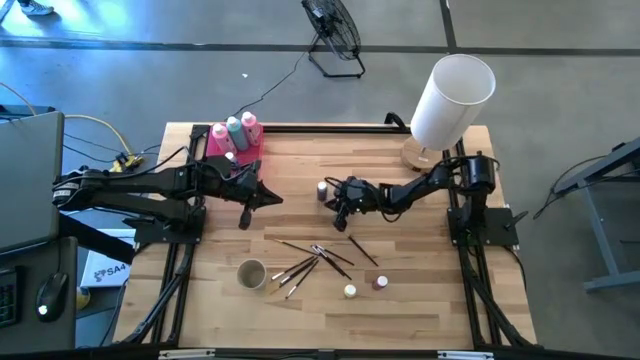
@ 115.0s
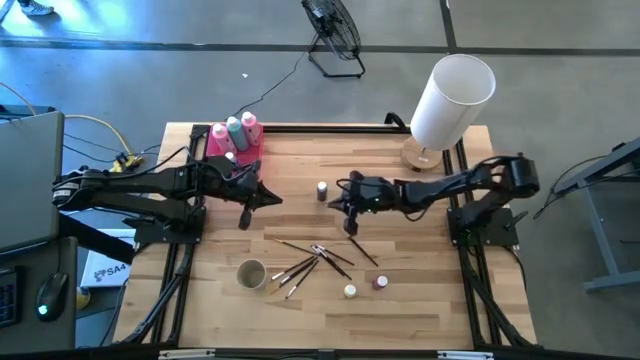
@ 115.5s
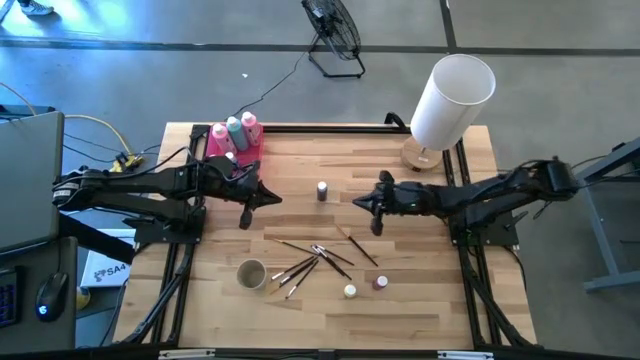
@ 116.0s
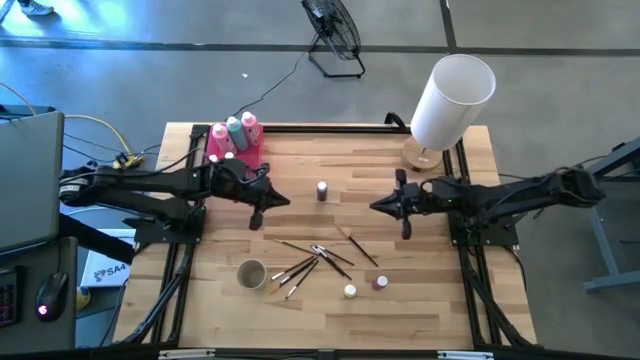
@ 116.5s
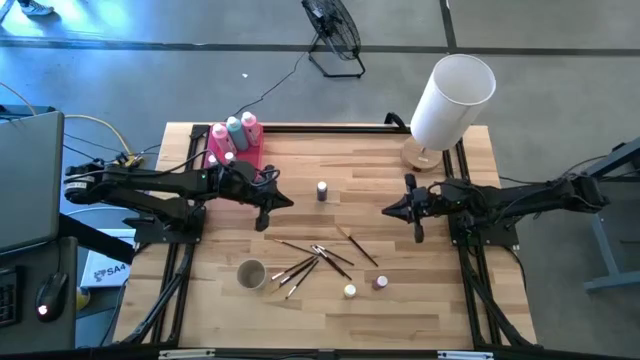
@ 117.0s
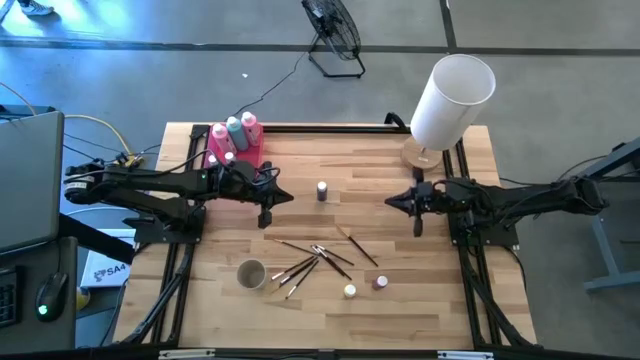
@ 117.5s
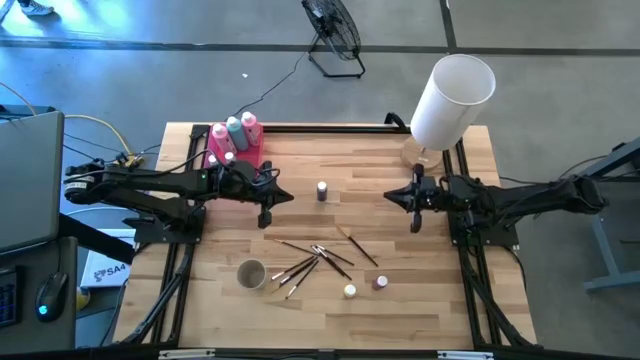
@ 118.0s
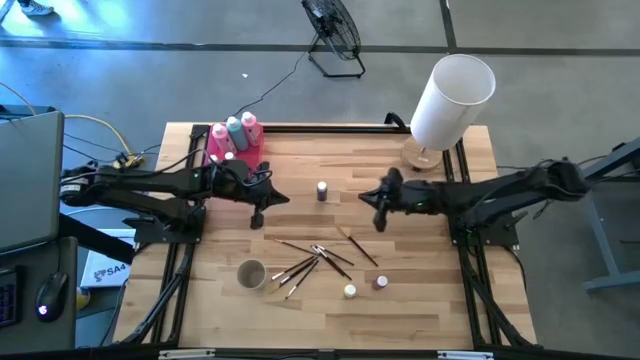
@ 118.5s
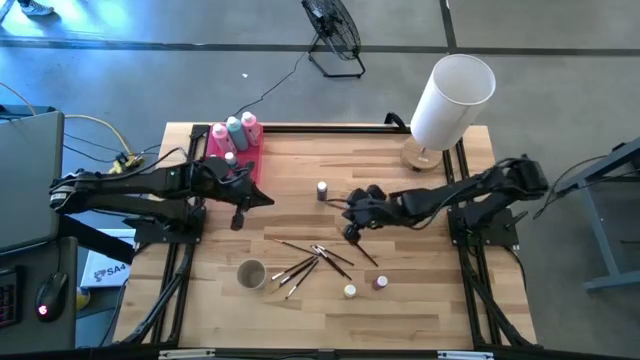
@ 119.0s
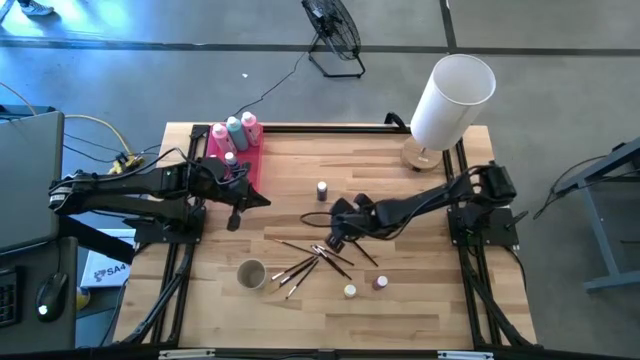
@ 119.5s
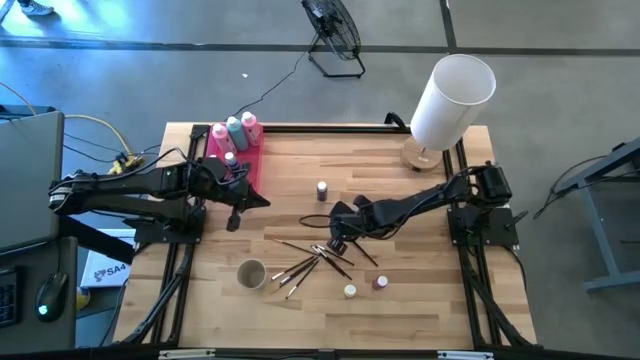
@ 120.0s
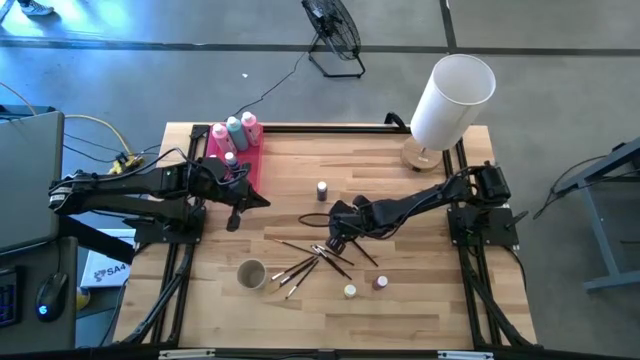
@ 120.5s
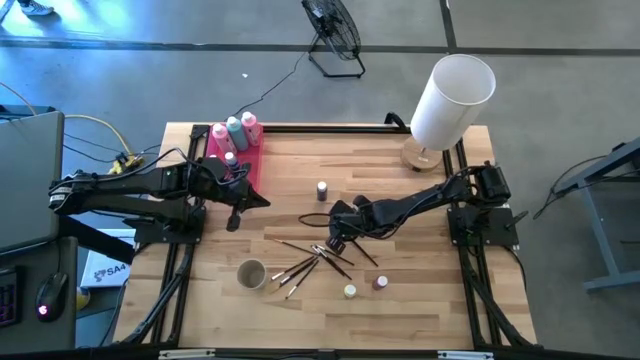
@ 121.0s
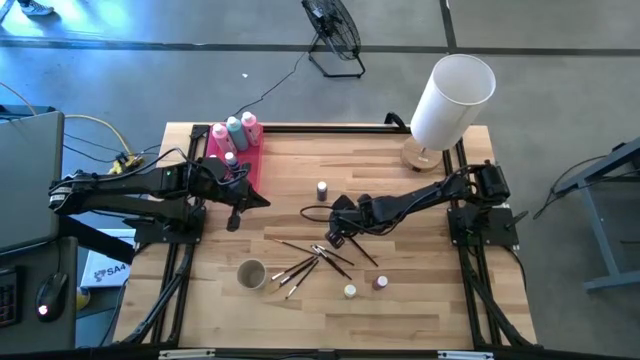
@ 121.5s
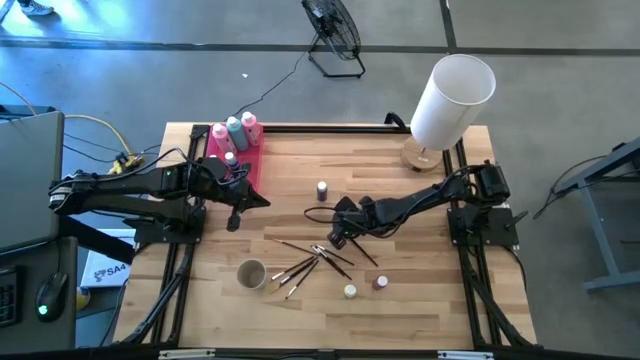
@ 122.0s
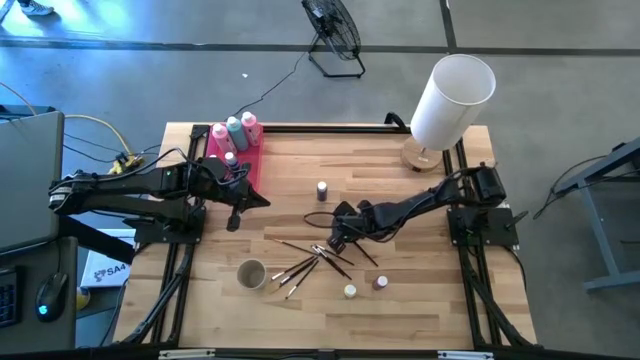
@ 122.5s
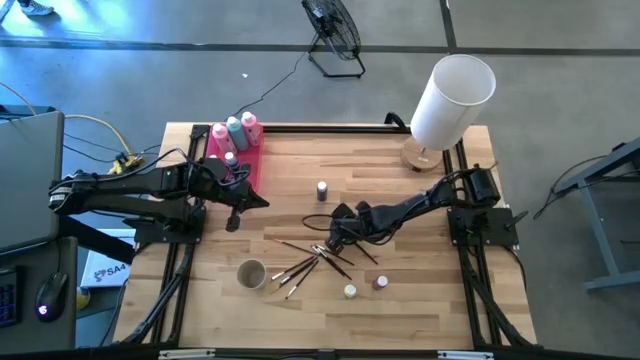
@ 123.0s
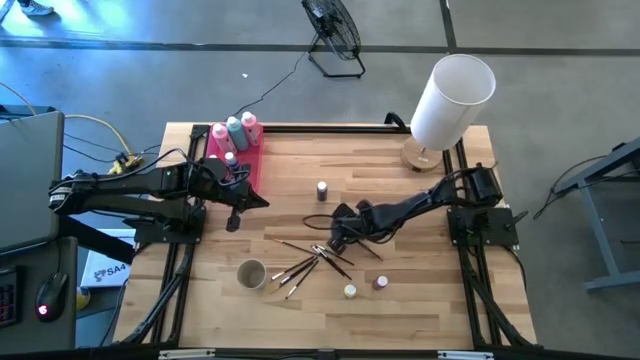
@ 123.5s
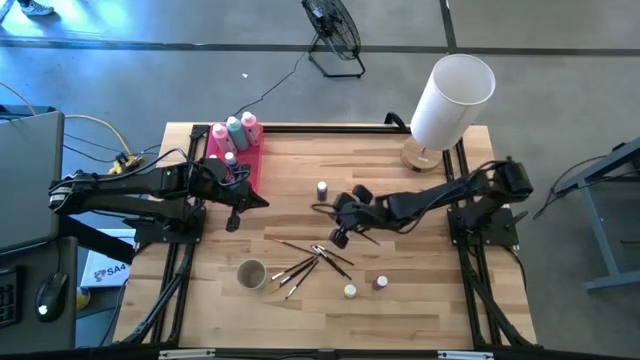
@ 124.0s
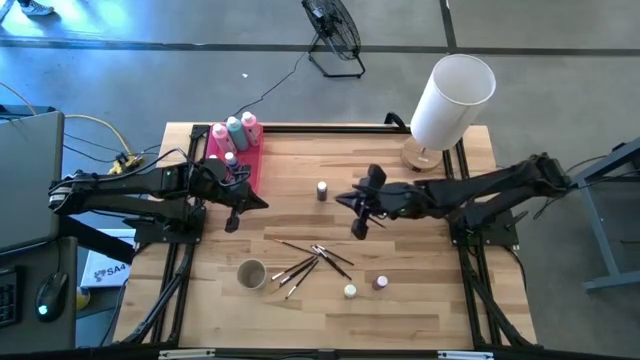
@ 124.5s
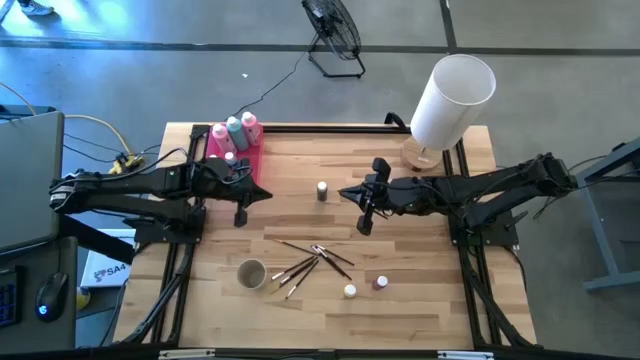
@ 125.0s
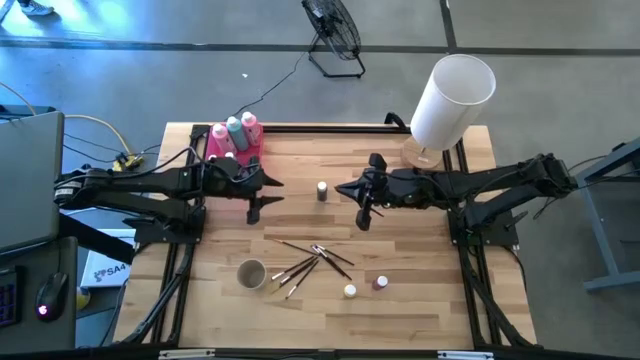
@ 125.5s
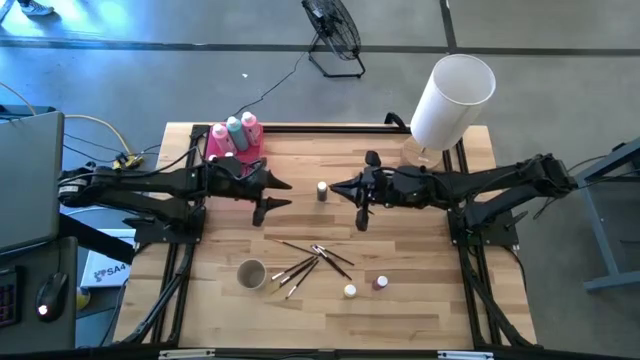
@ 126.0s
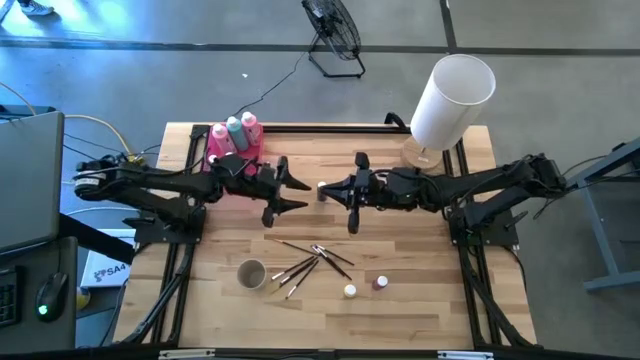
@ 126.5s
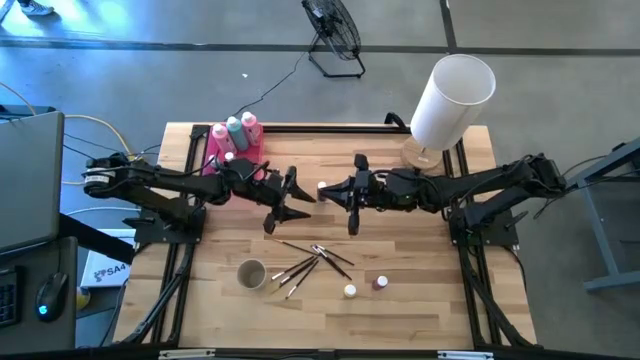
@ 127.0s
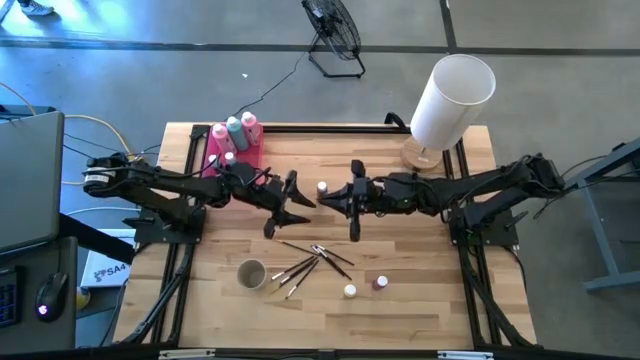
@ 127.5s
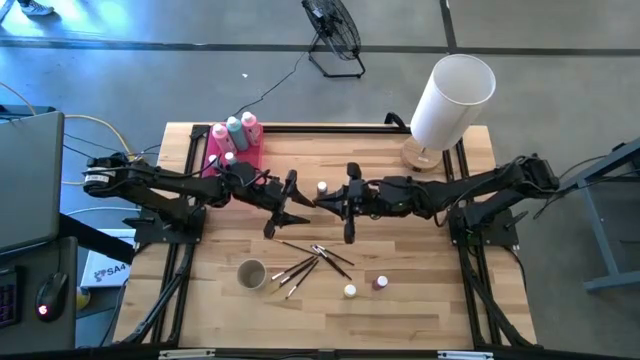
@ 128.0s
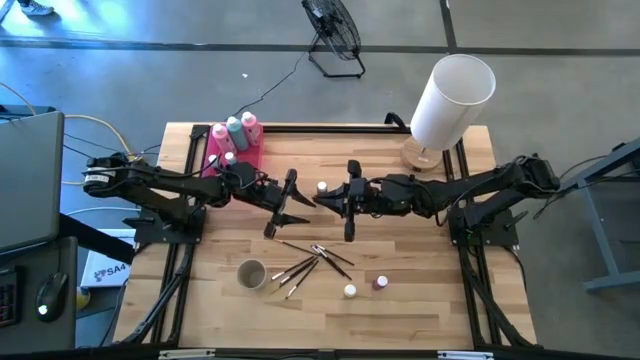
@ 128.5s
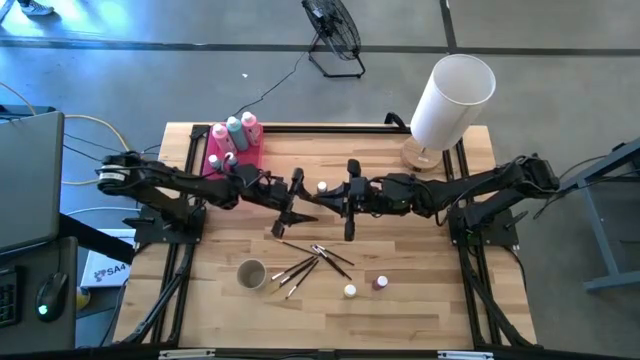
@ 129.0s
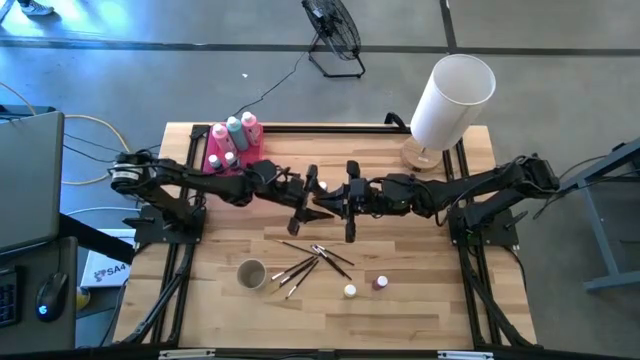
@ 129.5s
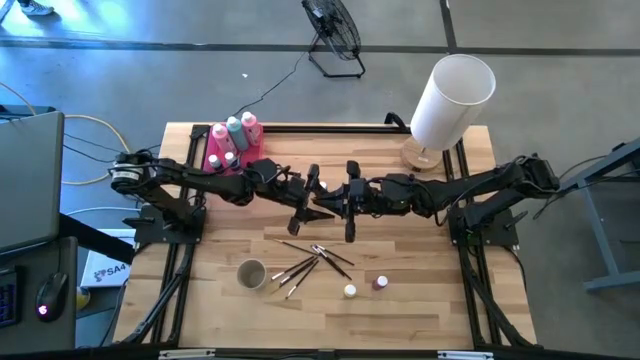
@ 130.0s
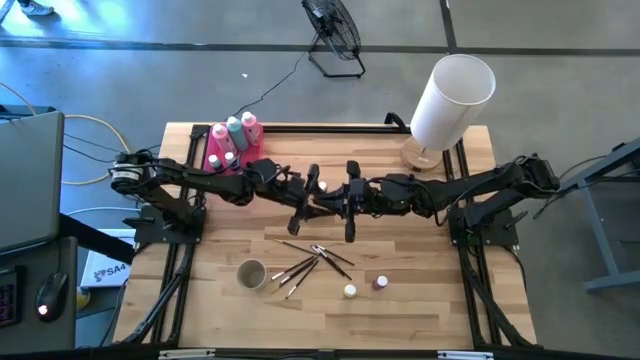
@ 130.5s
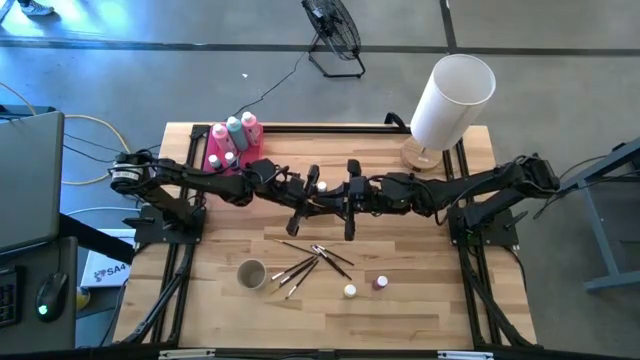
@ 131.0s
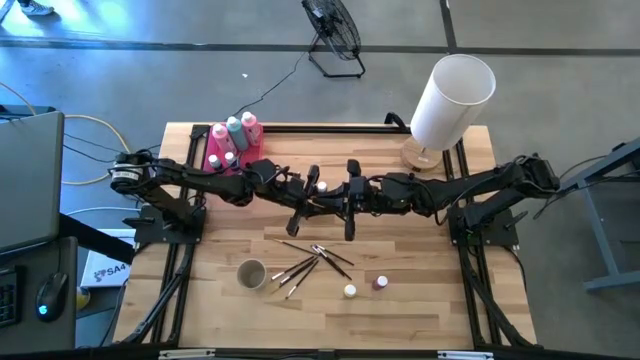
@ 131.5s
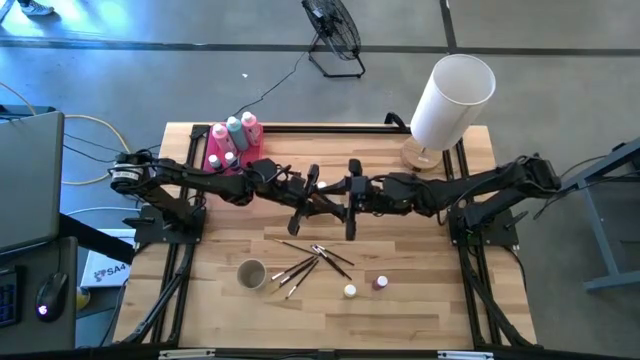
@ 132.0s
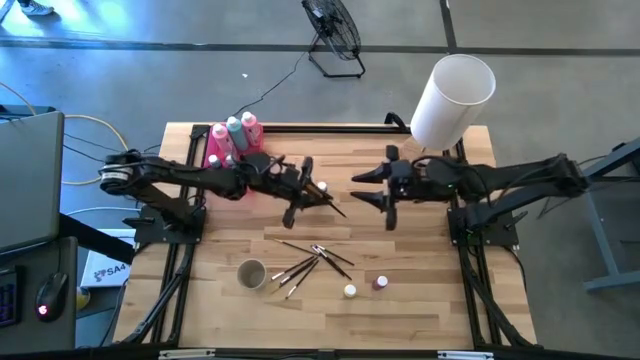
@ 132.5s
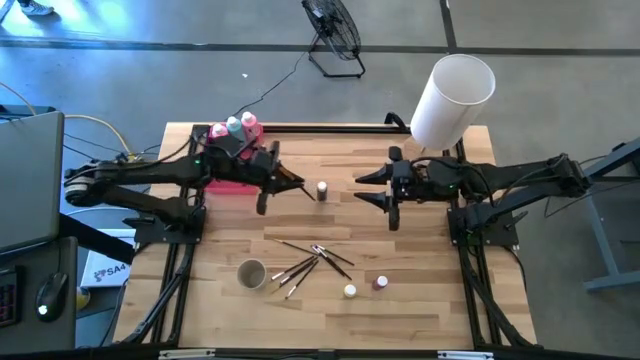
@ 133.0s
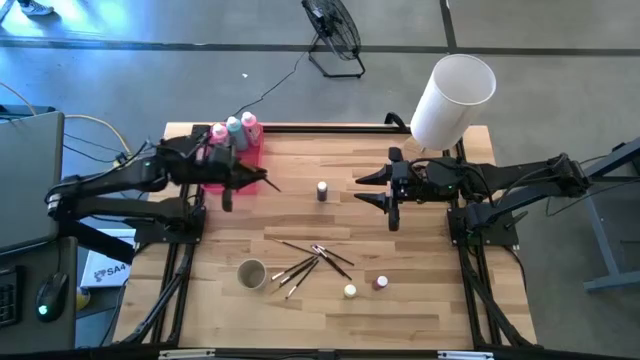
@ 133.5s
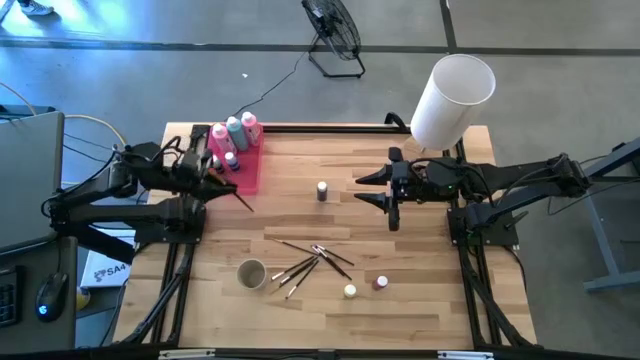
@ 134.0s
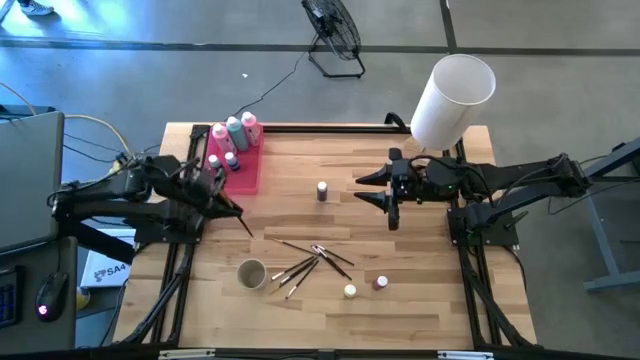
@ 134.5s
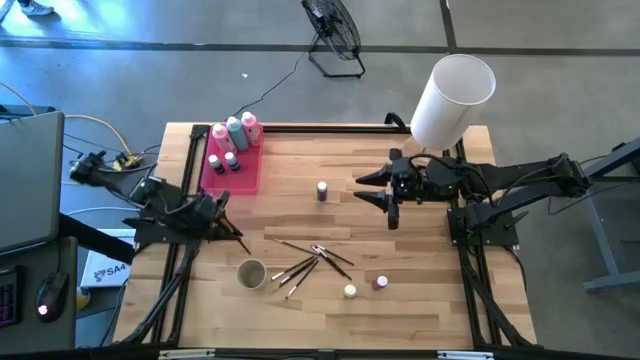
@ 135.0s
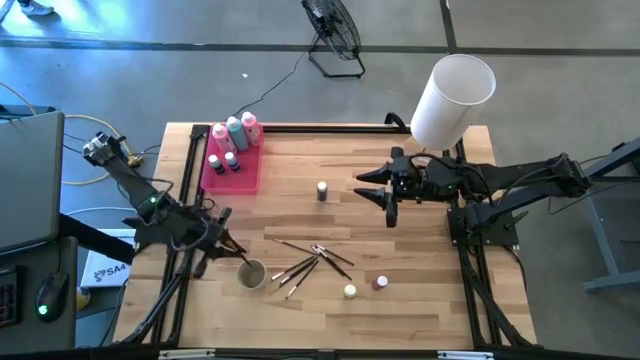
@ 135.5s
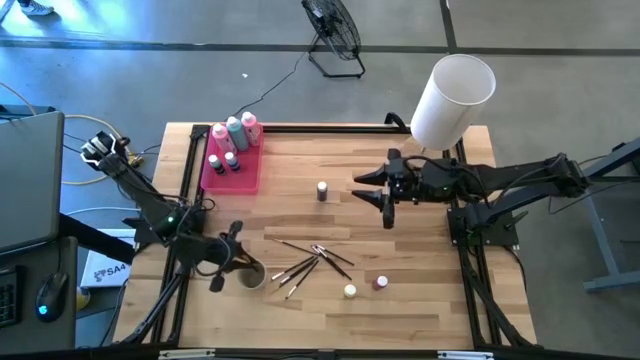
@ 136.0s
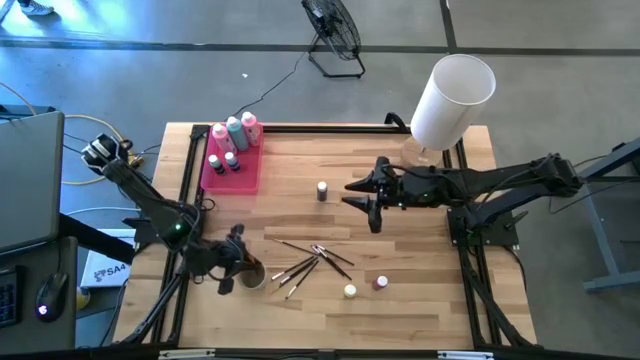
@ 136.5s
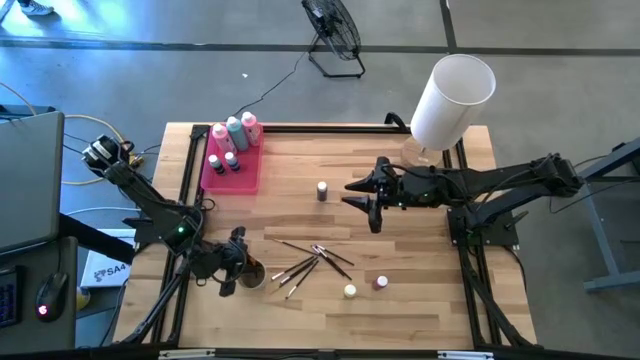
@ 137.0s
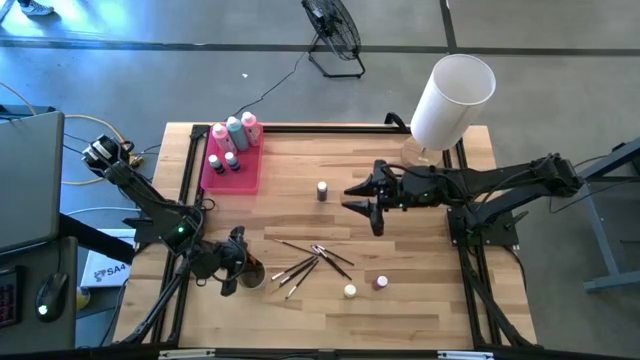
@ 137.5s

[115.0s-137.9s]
Task: Pick & Place Paint Supplies
Put the gold paintbrush into the light brown cup
